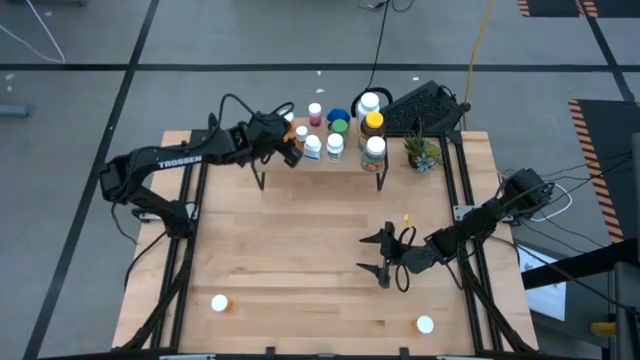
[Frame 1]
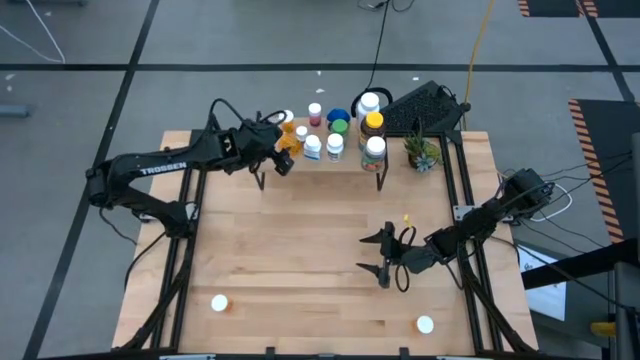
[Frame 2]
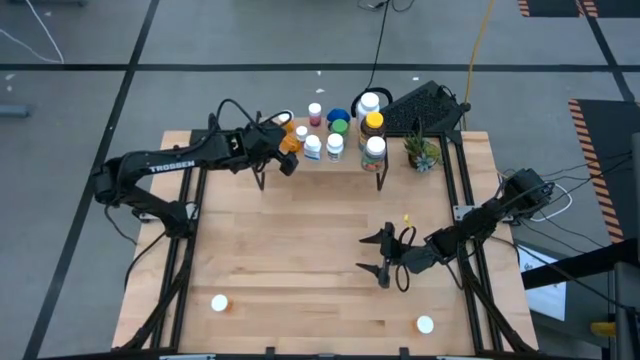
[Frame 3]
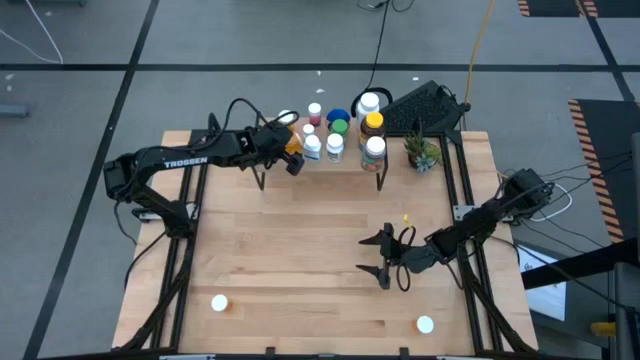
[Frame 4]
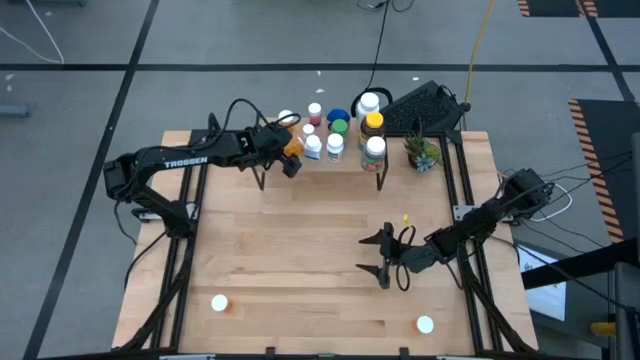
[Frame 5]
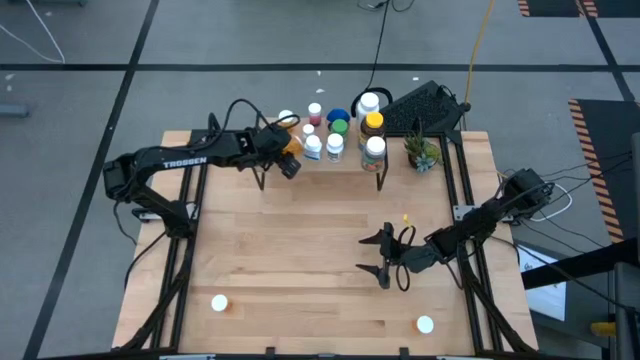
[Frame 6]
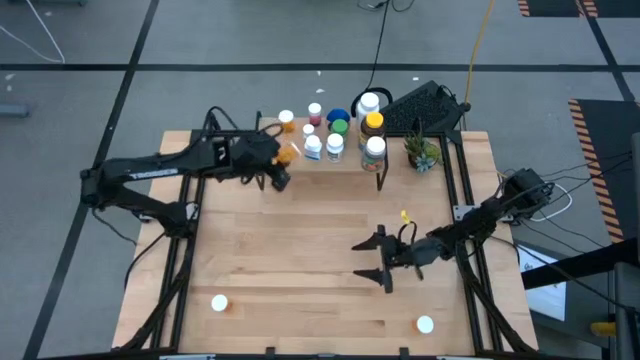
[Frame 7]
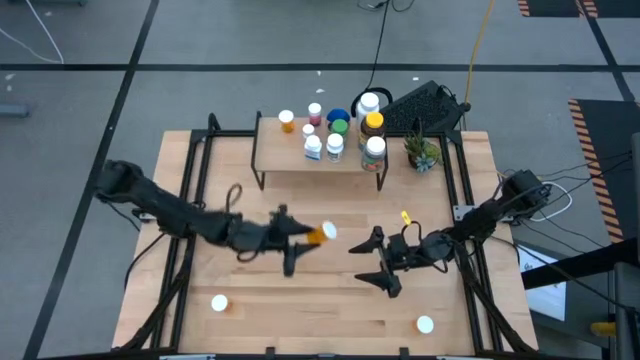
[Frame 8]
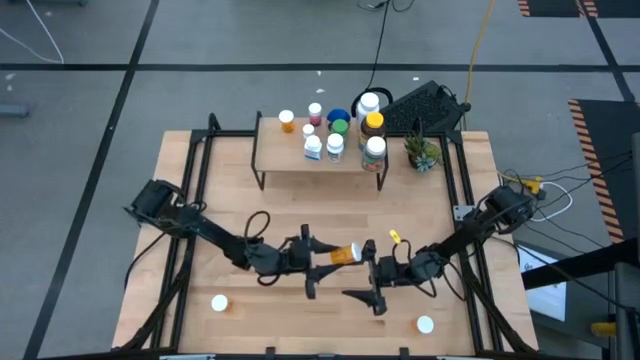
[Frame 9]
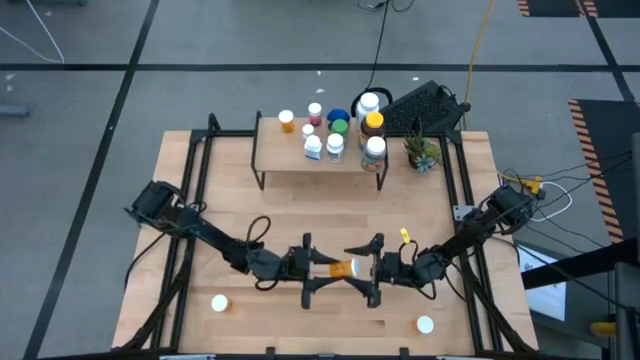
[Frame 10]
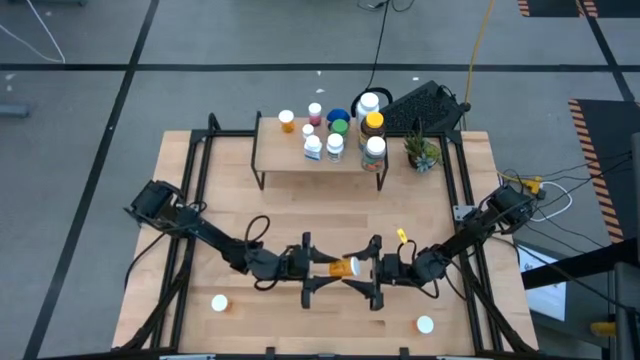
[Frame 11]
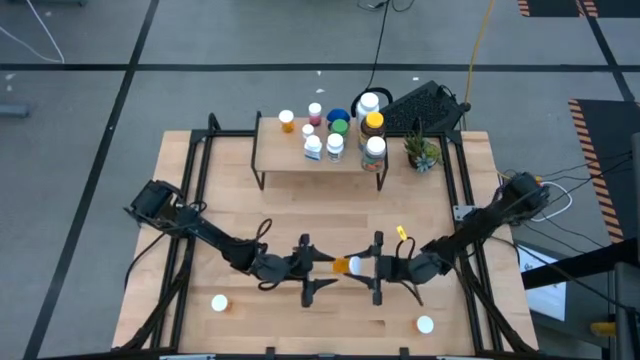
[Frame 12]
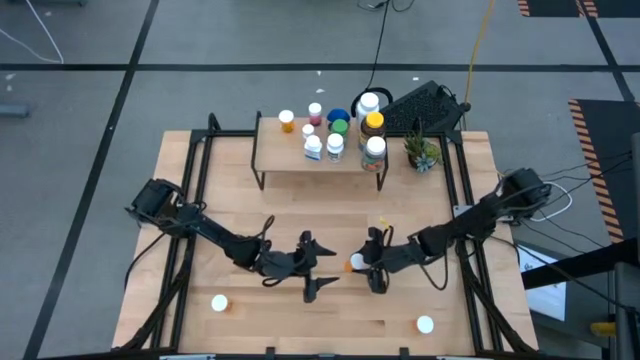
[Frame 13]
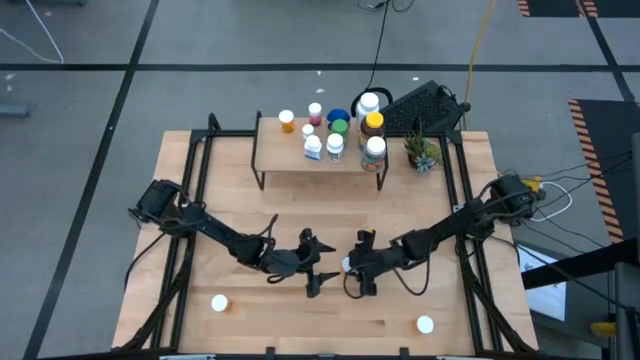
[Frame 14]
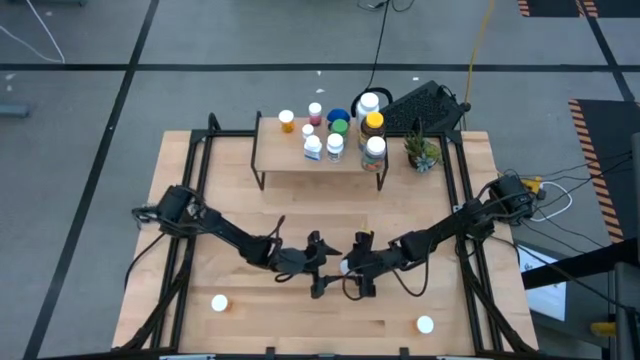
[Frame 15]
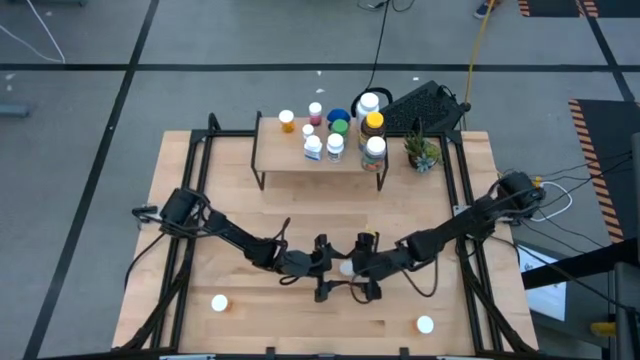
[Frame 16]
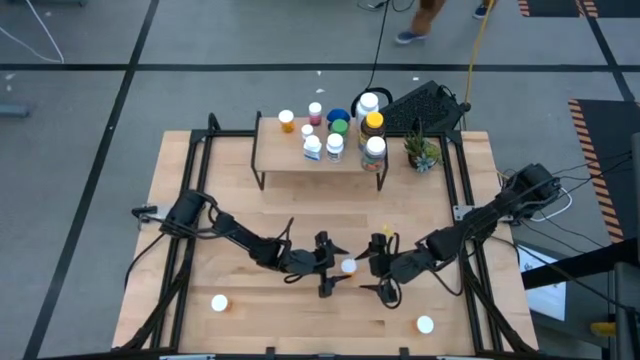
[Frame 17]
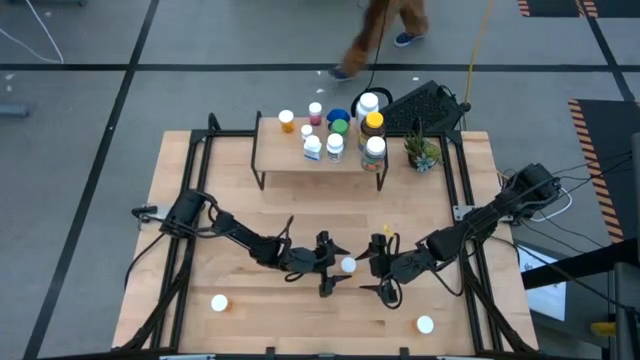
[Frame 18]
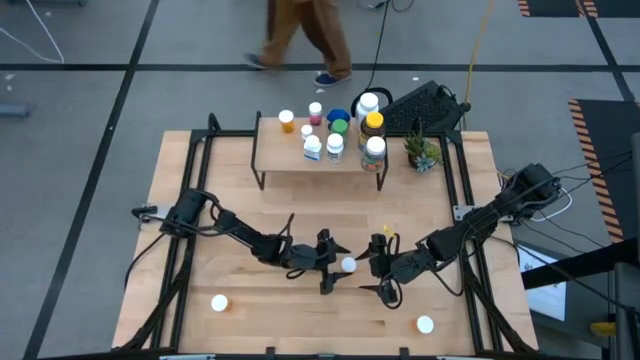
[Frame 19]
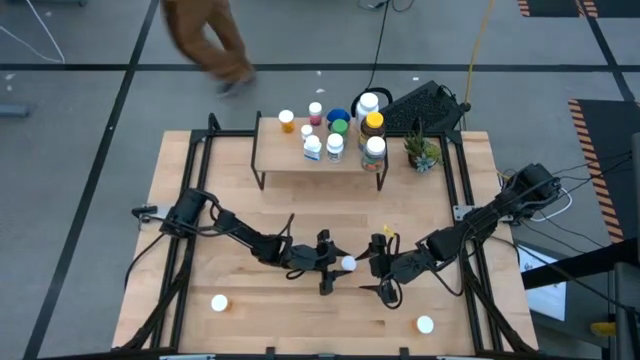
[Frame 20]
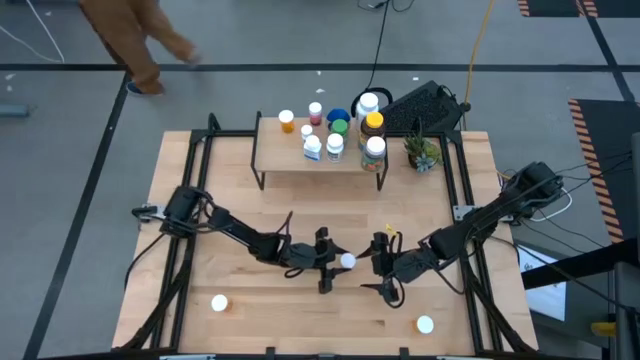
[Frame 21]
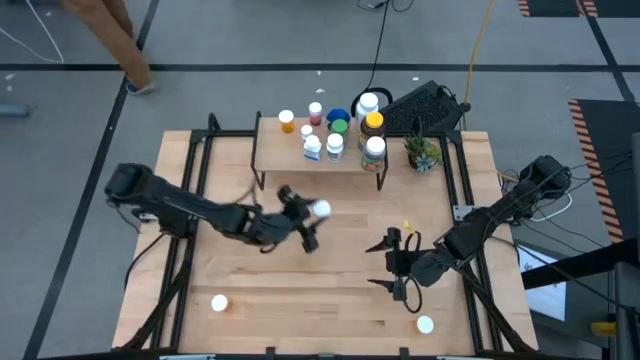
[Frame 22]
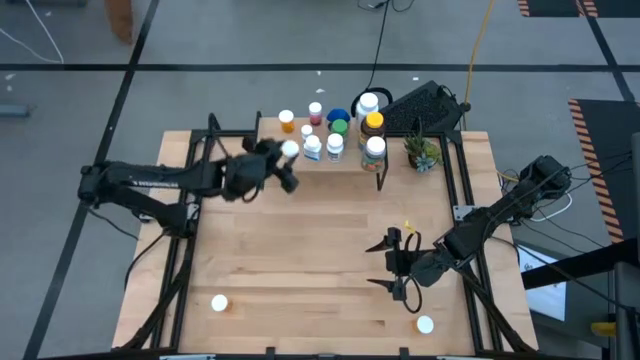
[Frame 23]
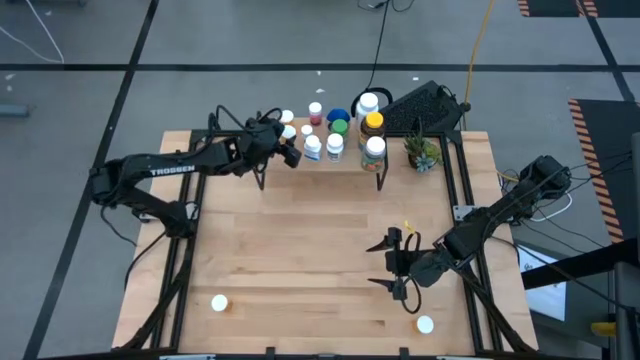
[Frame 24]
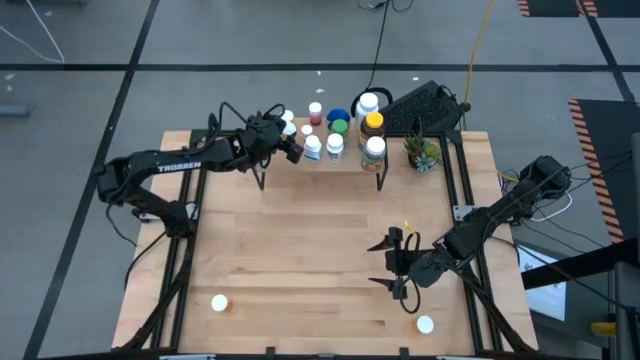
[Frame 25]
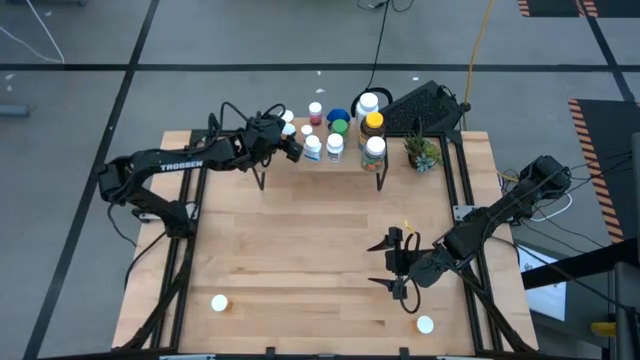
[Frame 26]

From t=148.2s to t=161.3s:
Task: Pick and place medicine bottles onto shelf by color
Put the middle orange pill bottle aligned with the other orange pill bottle on the shelf

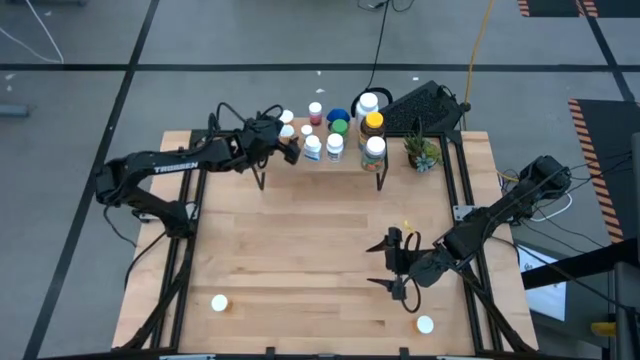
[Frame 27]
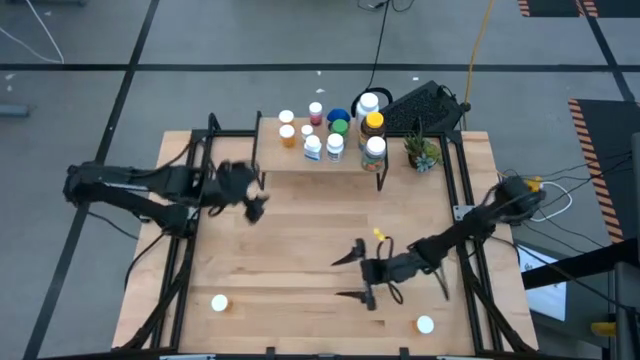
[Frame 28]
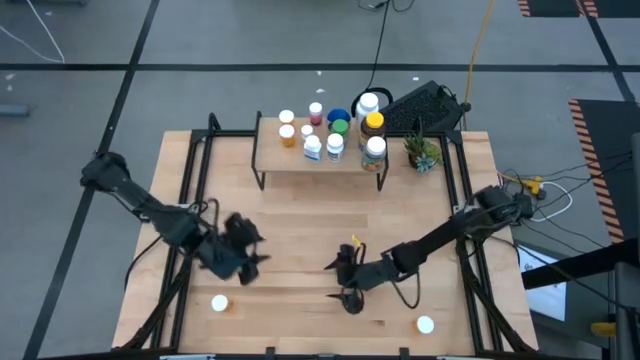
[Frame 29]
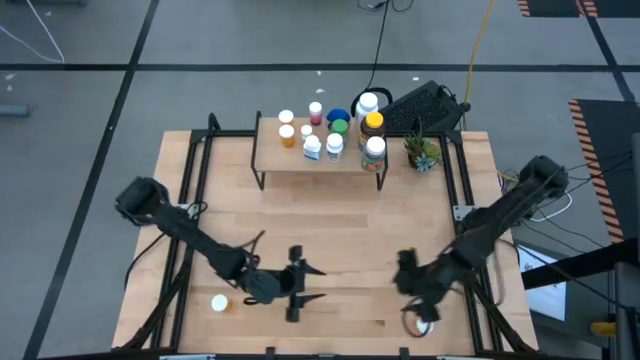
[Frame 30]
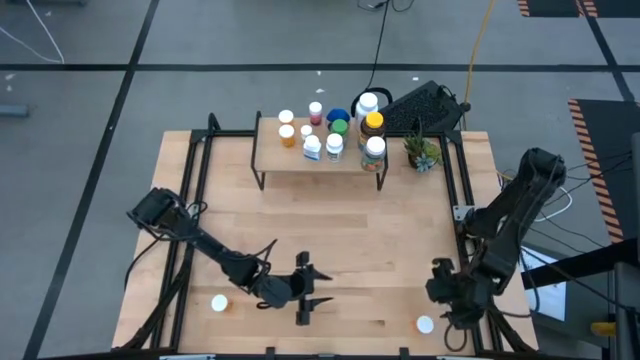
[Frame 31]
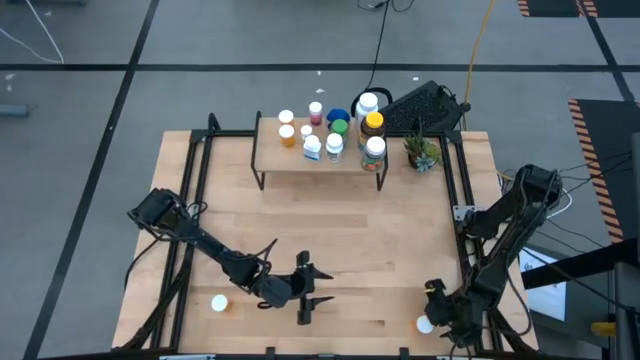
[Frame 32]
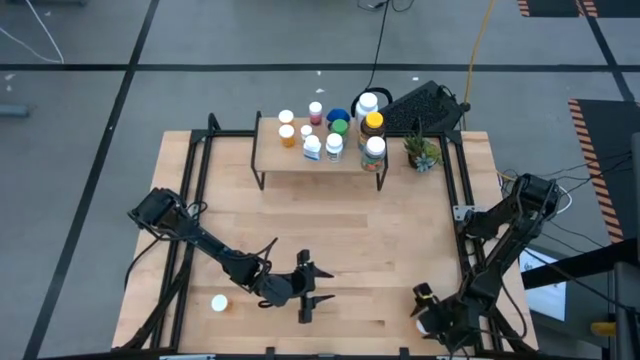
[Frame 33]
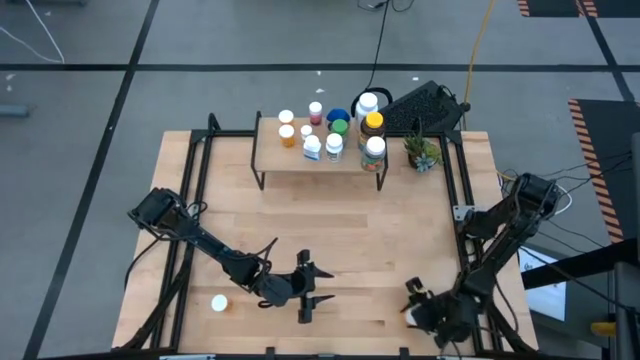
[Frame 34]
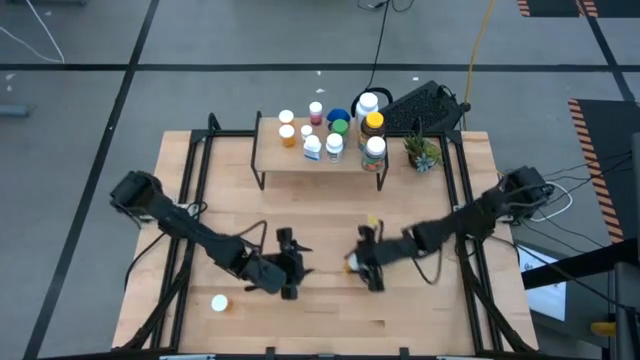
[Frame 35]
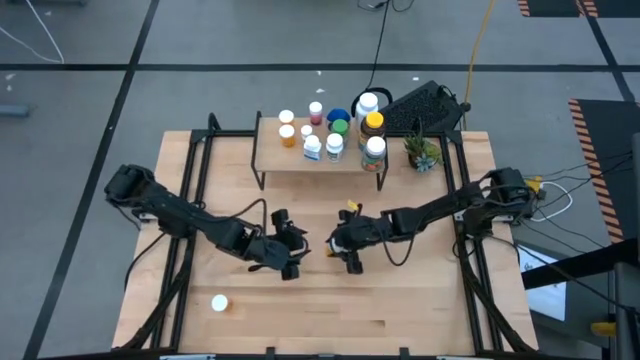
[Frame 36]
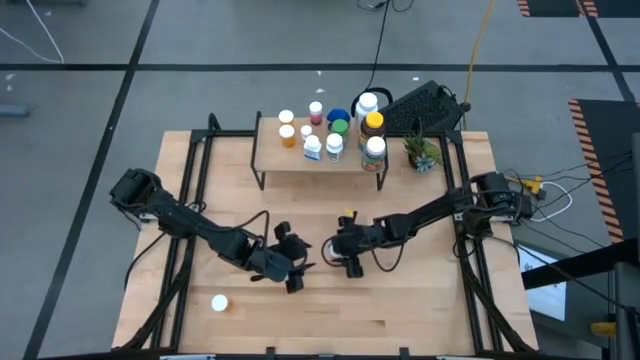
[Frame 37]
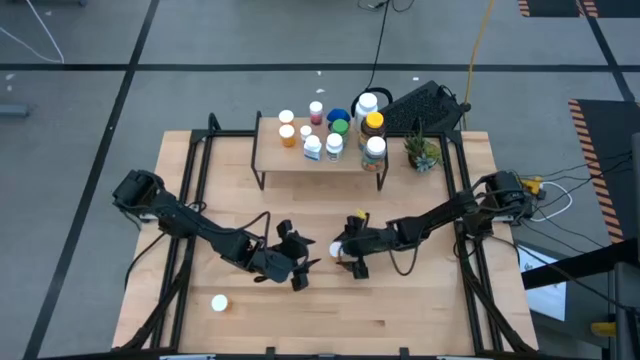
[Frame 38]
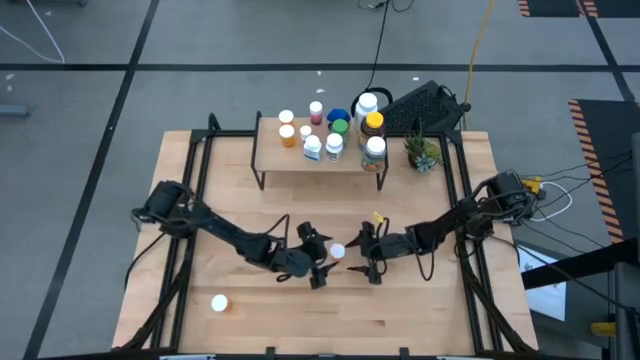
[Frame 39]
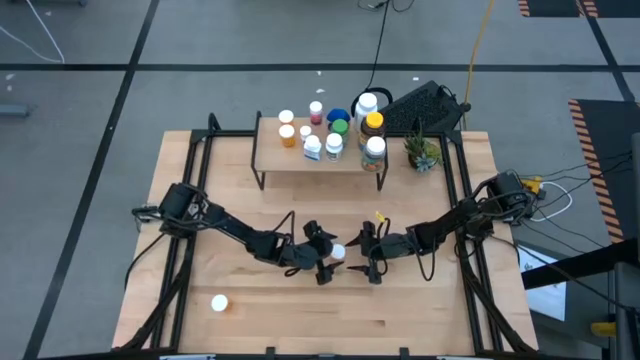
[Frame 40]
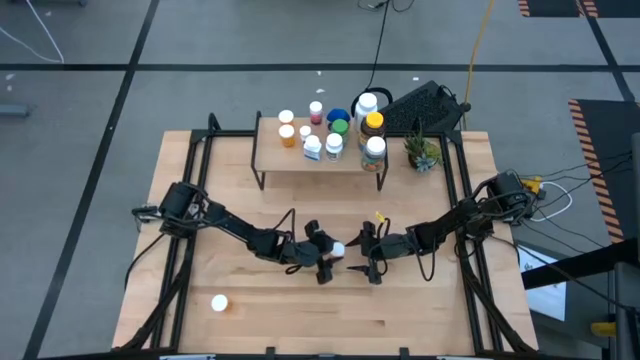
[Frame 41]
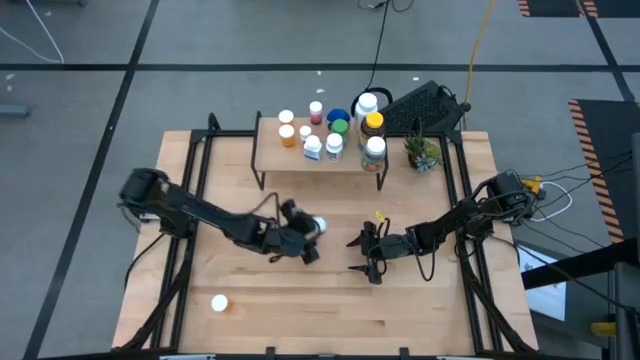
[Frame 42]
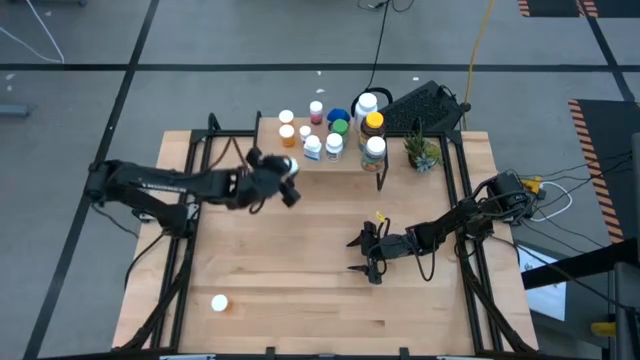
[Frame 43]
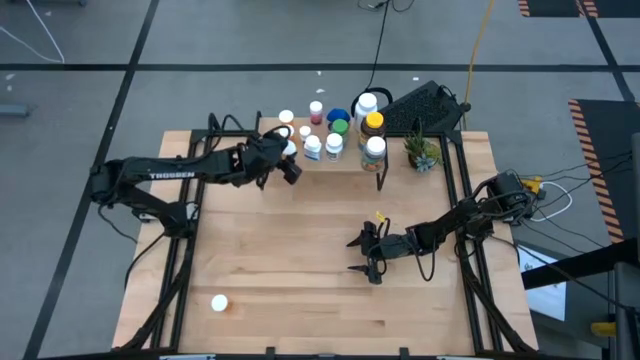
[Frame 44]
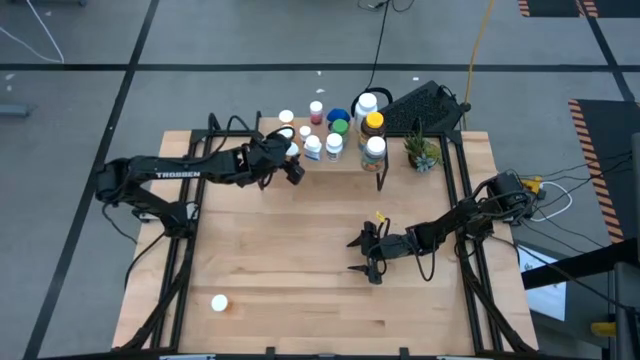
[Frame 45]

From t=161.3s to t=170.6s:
Put the right orange pill bottle aligned with the other orange pill bottle on the shelf
